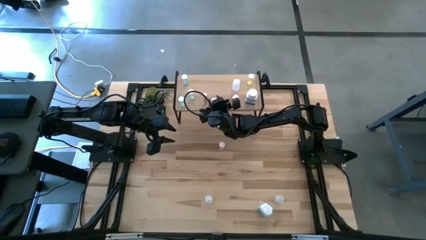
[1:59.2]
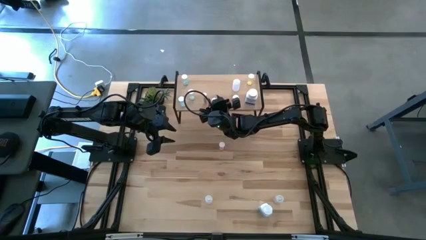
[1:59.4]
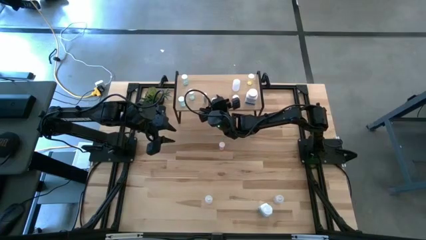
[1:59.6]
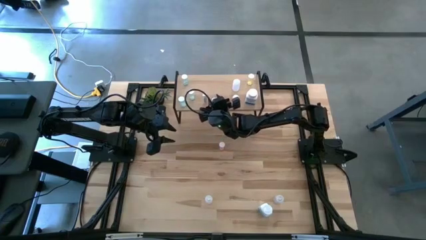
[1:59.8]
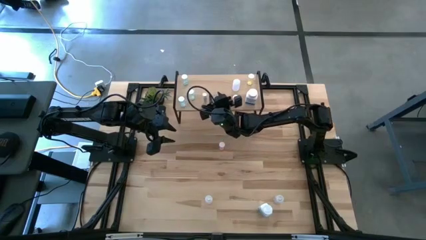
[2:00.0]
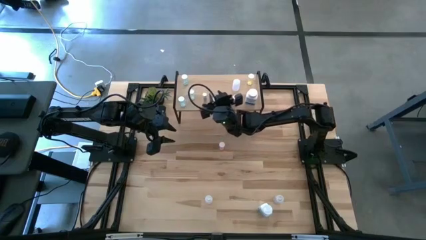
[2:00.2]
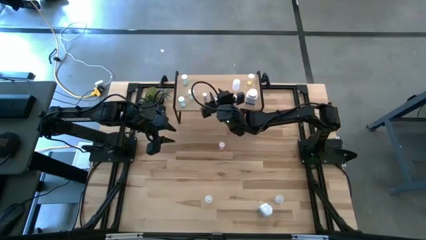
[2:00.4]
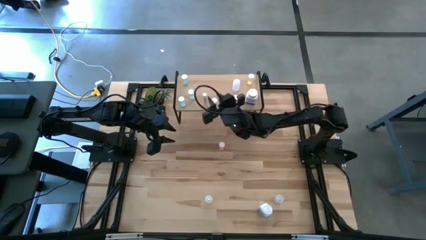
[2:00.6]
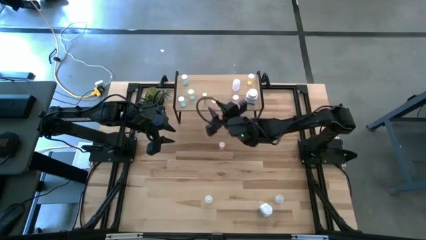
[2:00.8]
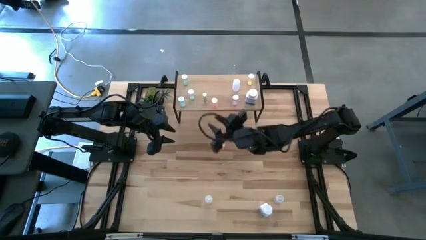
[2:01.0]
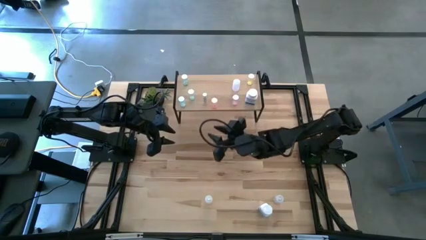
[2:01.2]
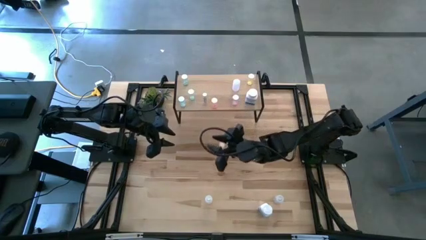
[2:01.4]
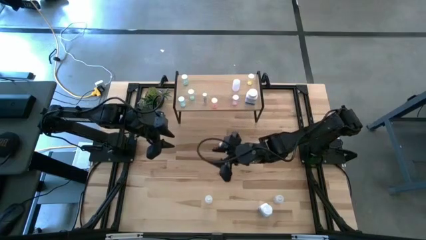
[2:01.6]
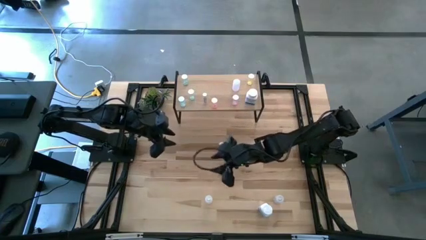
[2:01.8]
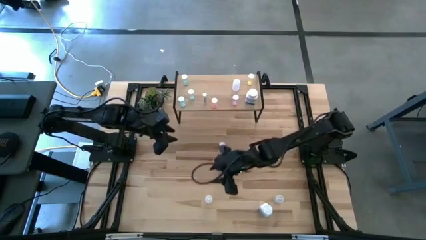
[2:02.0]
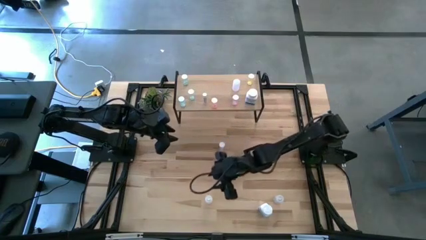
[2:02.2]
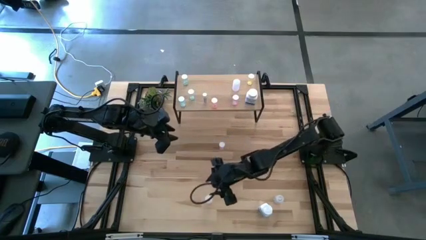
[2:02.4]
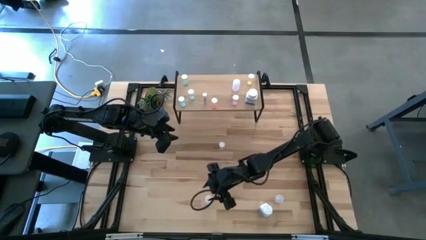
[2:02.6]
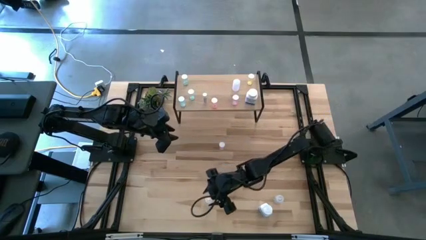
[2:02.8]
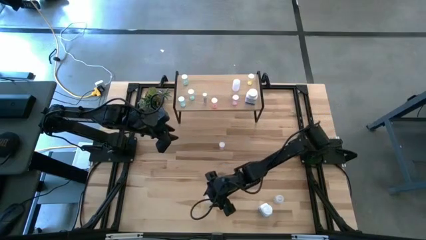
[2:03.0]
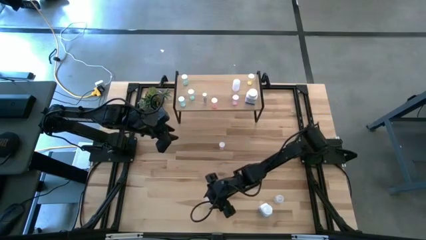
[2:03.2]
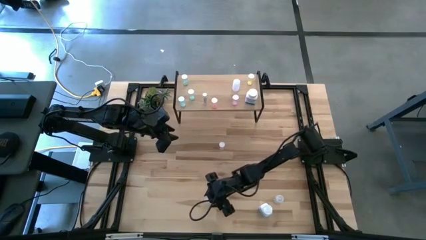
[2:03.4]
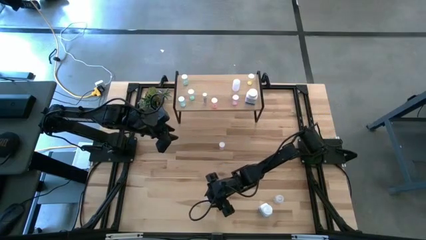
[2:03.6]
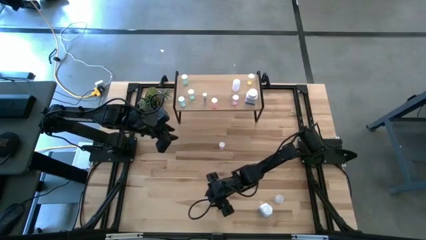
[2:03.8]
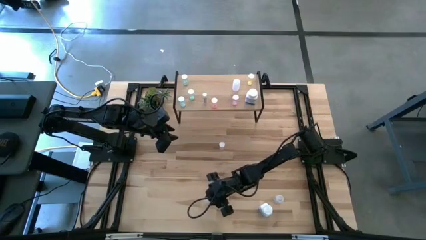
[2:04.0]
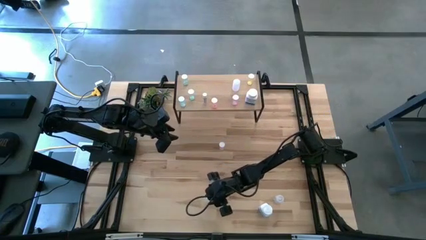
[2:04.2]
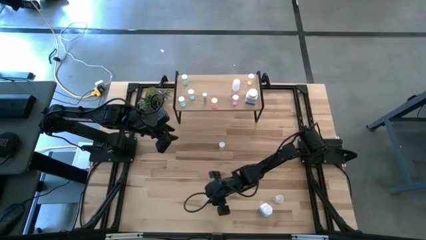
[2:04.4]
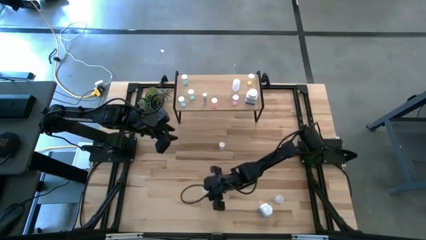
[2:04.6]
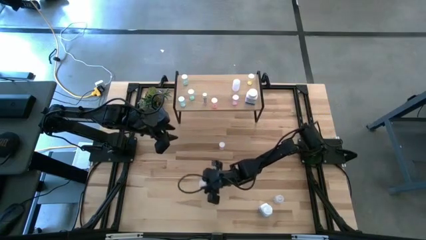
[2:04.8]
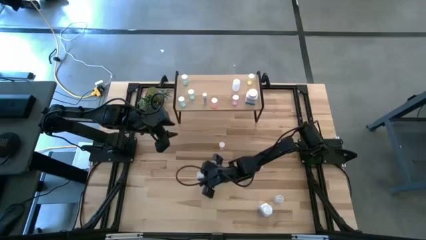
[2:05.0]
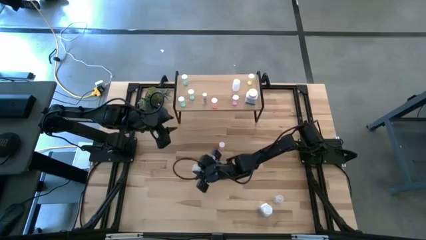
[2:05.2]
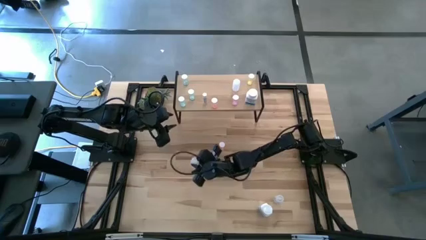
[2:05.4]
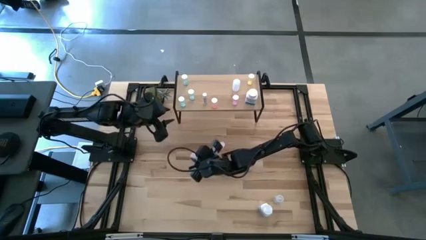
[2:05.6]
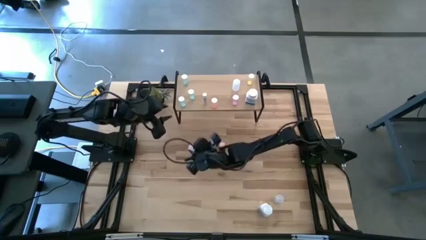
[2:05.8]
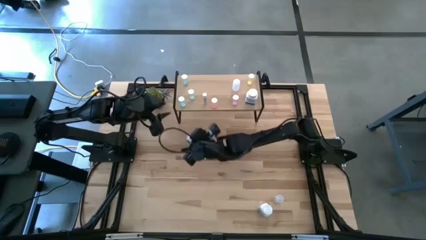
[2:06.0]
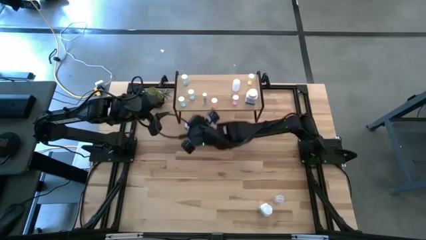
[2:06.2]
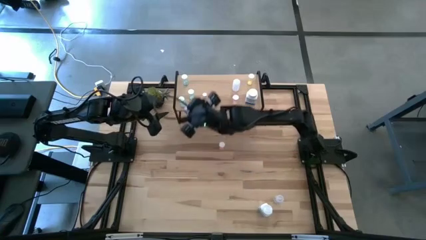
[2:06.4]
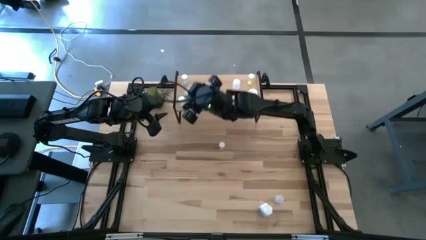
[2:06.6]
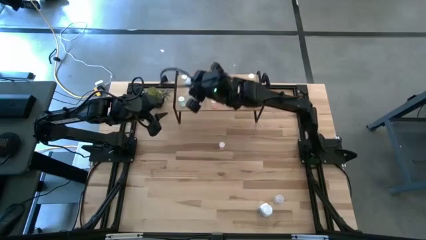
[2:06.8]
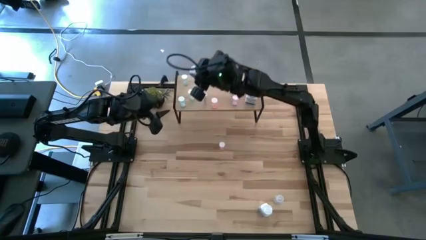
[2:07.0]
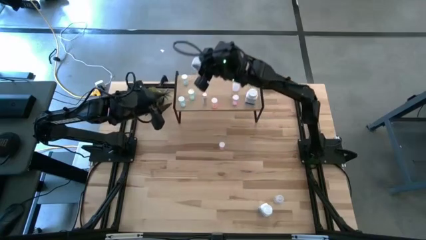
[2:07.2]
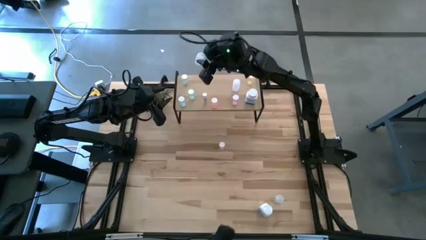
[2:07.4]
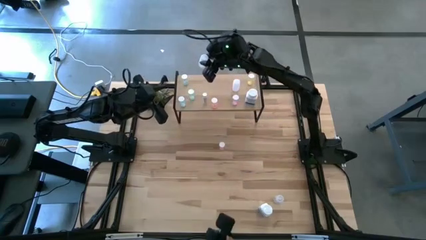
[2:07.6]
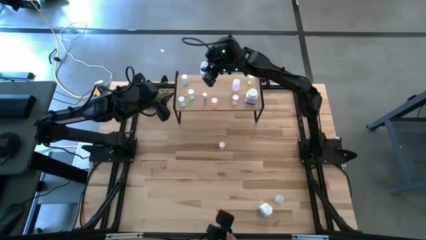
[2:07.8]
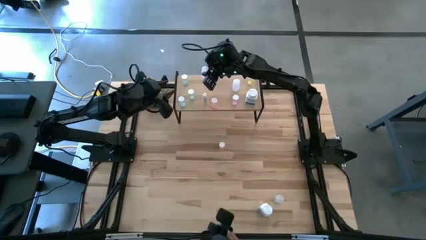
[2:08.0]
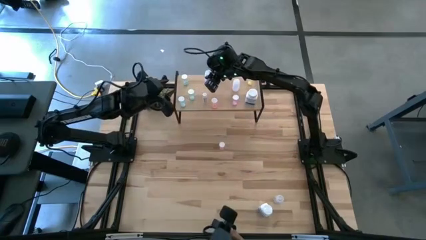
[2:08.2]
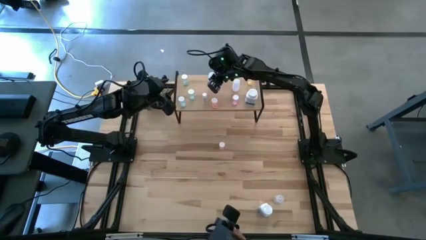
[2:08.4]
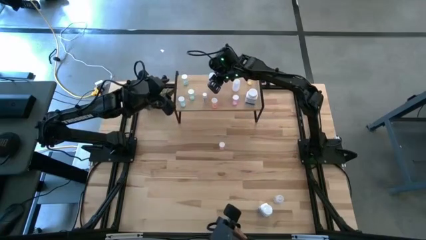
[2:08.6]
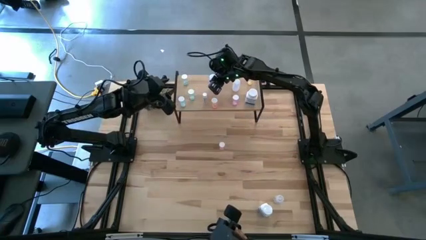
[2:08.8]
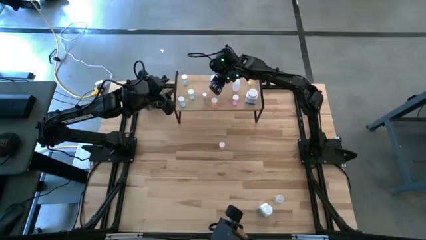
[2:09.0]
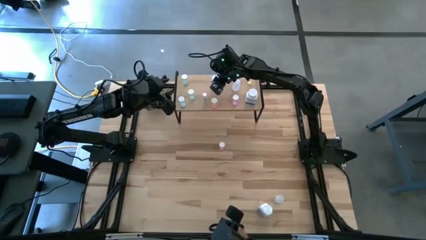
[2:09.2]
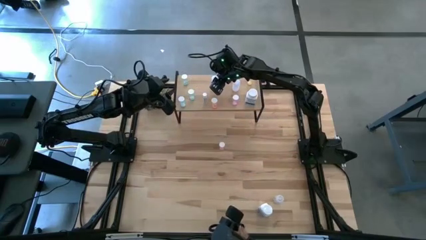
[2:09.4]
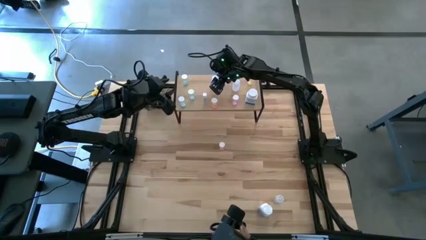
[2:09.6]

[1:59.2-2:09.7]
Task: Pick and place medicine bottles onto shelf by color
Put the left transparent pill bottle on the shelf

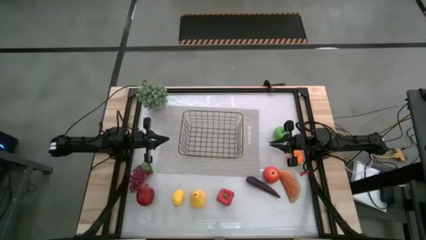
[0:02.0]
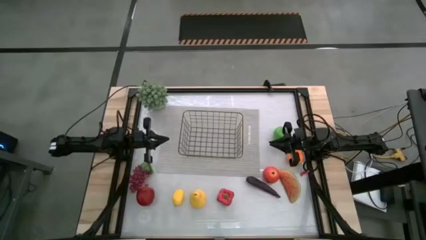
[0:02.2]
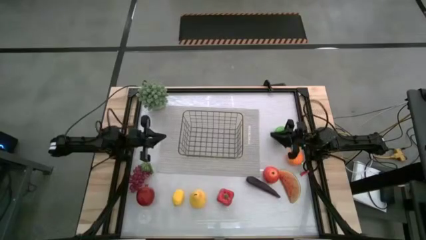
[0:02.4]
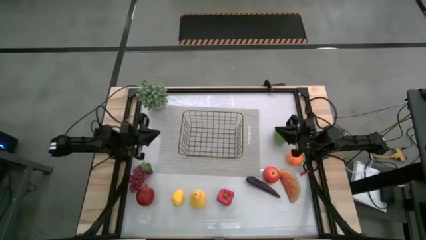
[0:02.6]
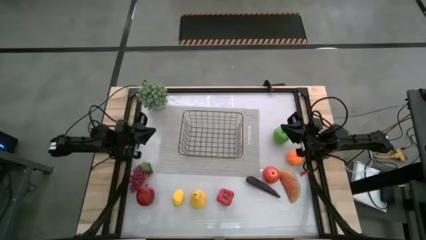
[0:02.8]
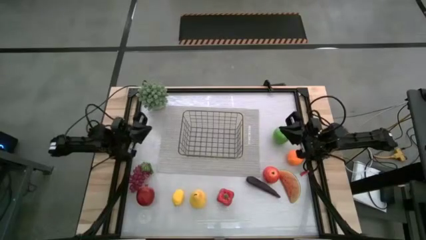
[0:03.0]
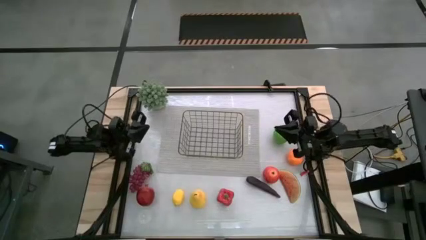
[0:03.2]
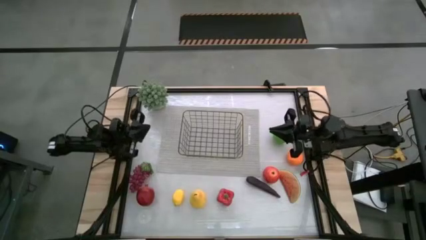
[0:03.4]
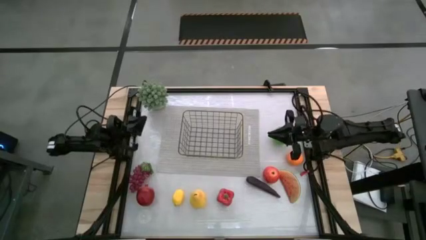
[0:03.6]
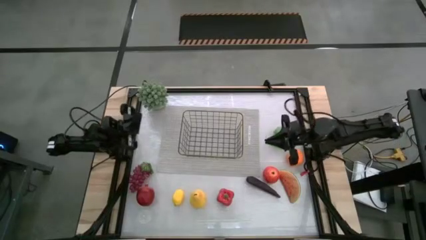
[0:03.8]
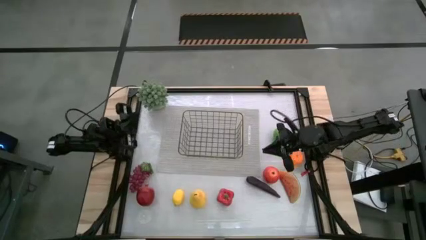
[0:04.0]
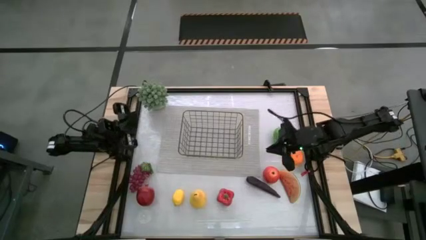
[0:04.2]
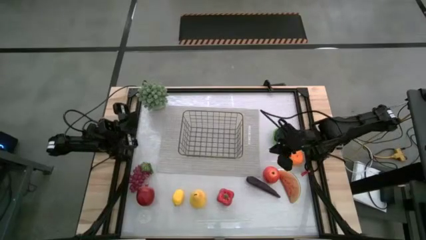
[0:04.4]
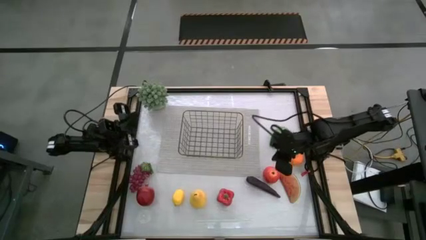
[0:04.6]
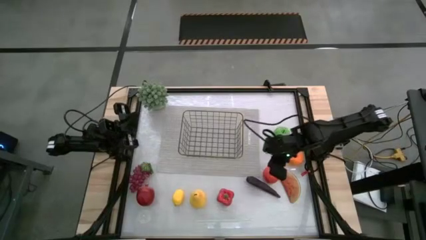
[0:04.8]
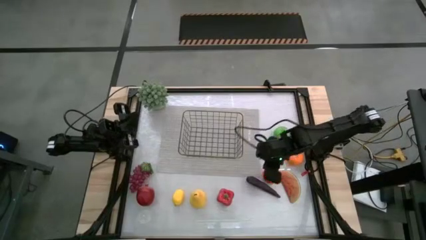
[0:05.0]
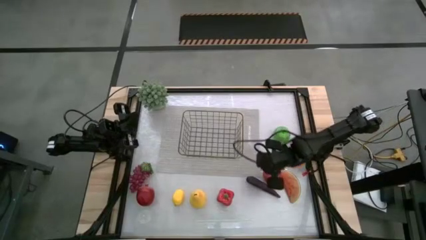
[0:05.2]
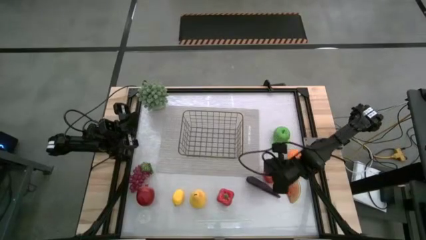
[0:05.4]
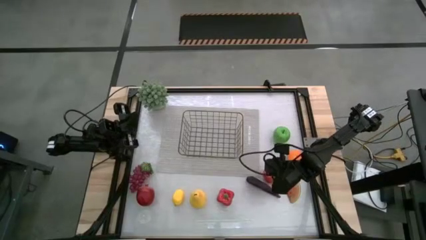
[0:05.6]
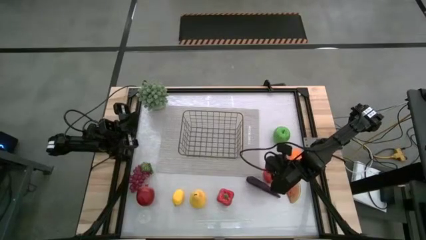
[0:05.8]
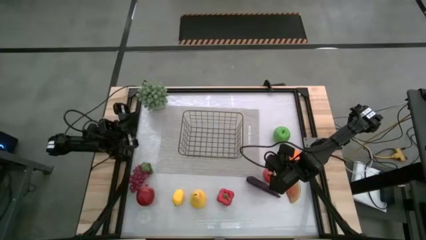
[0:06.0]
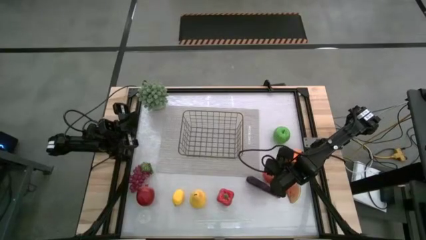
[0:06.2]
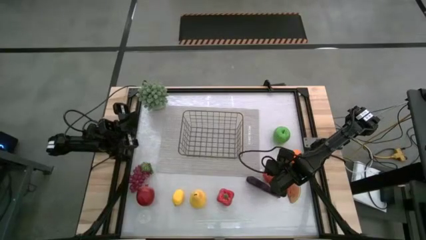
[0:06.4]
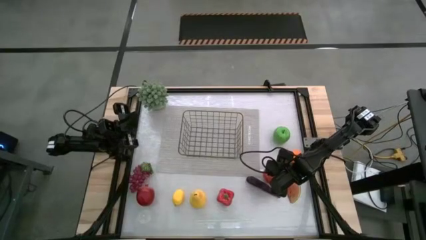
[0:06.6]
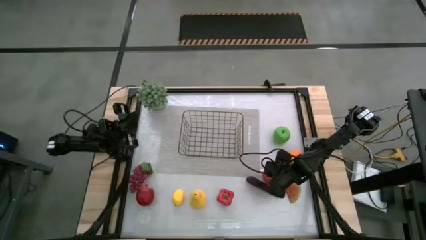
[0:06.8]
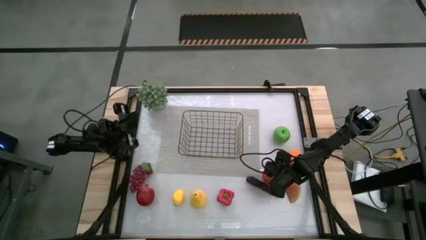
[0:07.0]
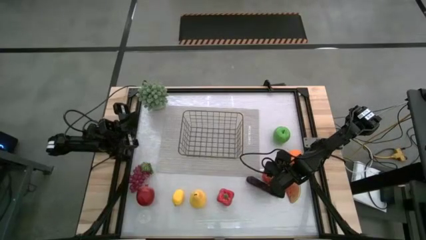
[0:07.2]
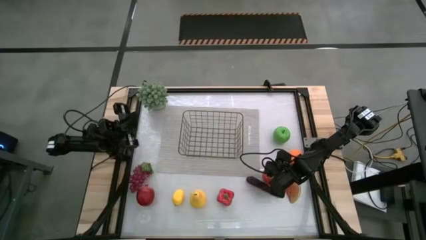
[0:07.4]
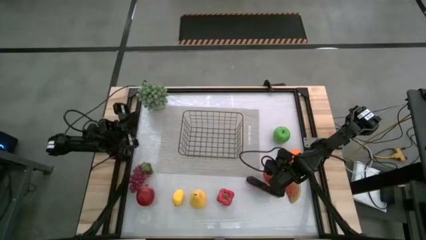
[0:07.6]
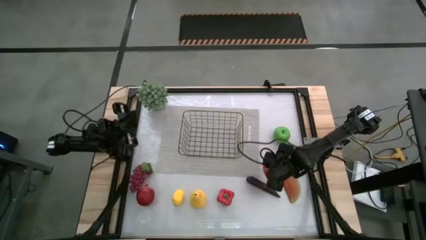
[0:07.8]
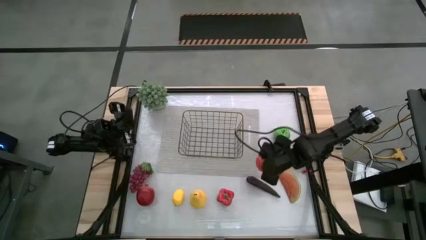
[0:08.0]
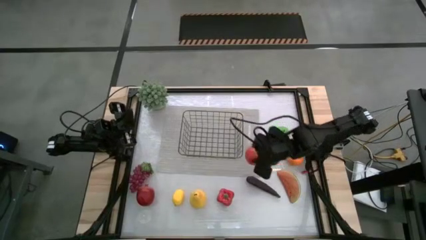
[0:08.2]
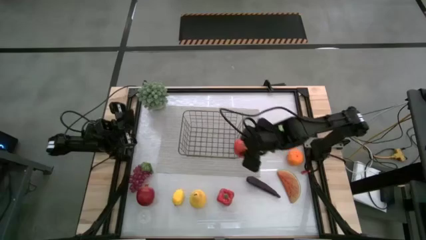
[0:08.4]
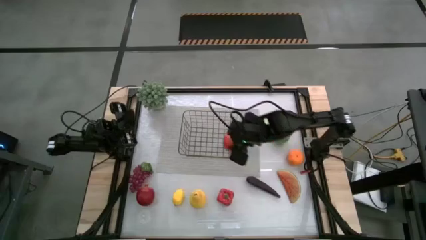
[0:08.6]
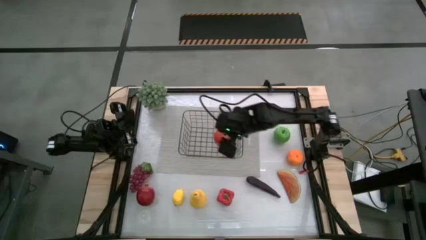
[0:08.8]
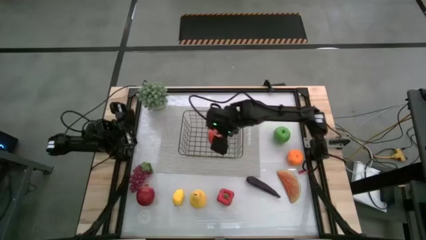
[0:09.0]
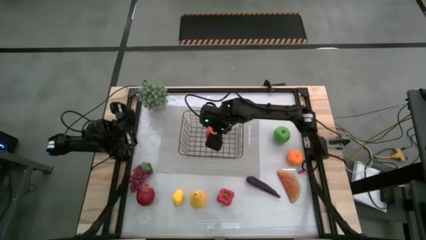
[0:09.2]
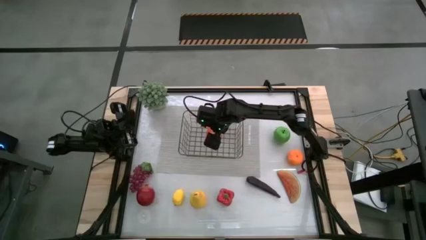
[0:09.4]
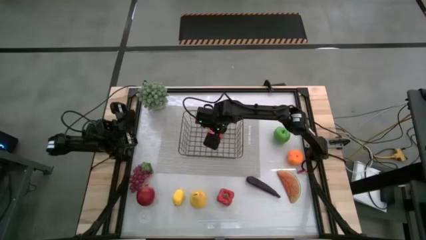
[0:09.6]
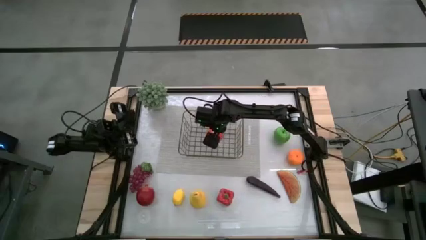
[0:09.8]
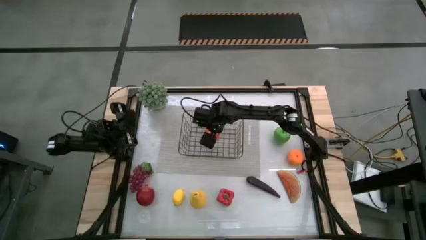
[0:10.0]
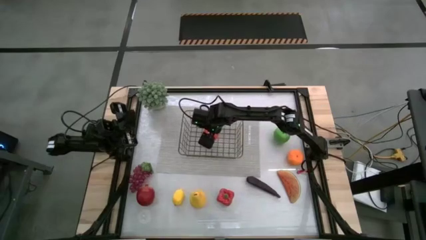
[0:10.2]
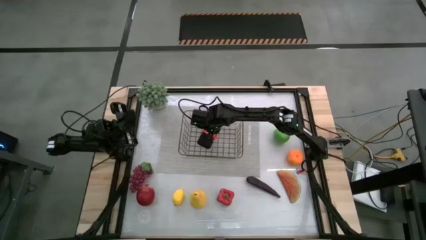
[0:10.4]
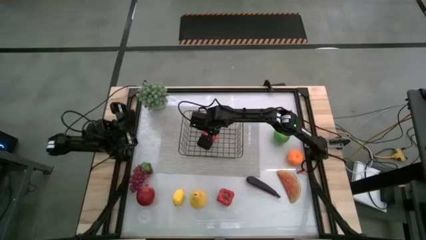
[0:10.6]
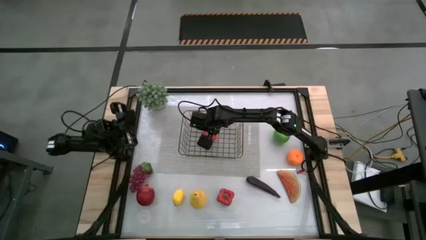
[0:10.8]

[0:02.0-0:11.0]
Task: Build produce basket
Put the red apple into the wire basket
